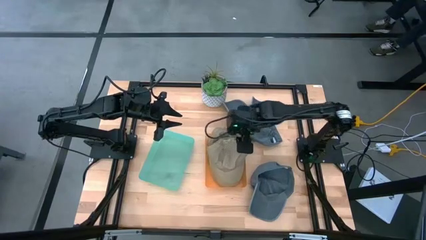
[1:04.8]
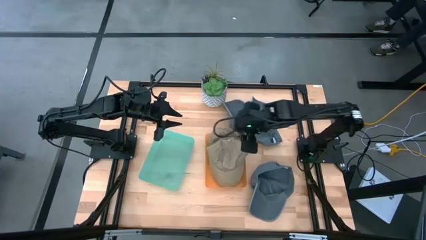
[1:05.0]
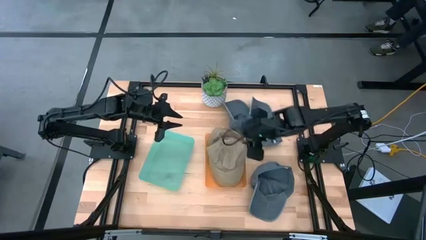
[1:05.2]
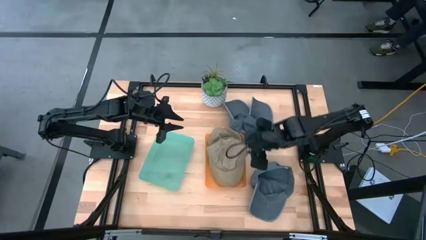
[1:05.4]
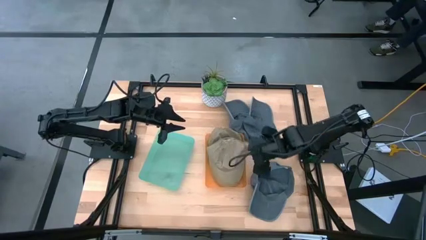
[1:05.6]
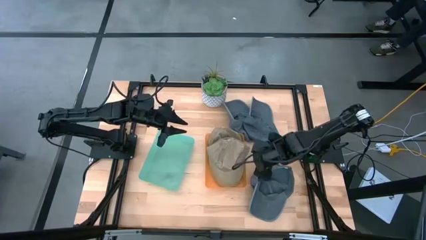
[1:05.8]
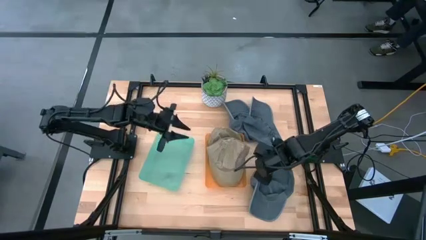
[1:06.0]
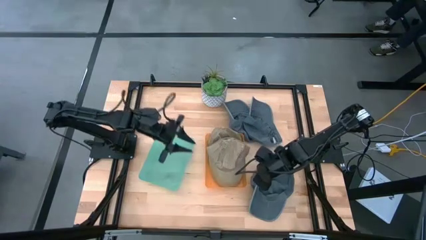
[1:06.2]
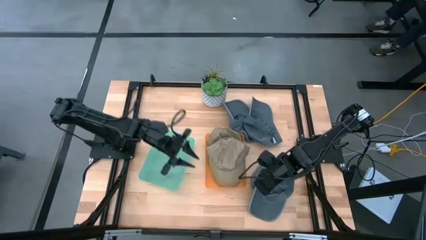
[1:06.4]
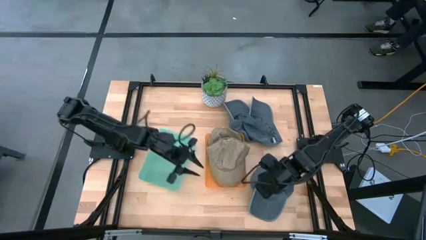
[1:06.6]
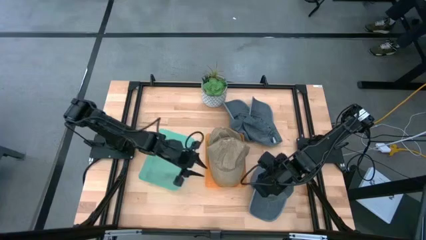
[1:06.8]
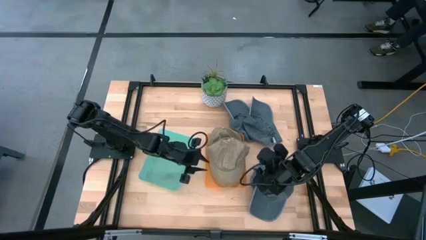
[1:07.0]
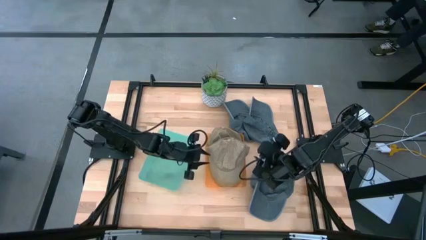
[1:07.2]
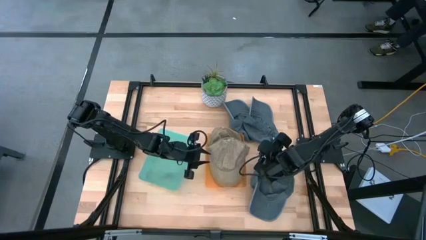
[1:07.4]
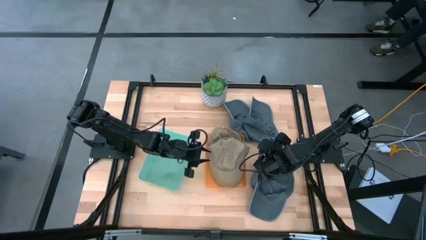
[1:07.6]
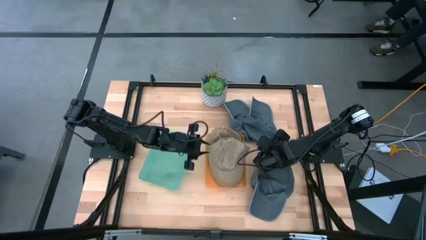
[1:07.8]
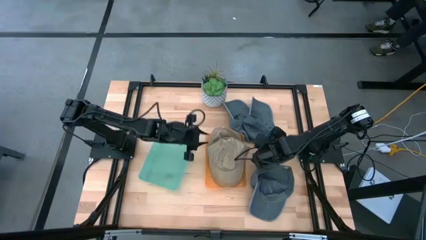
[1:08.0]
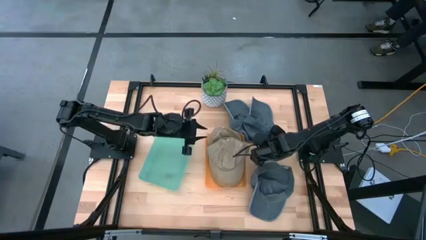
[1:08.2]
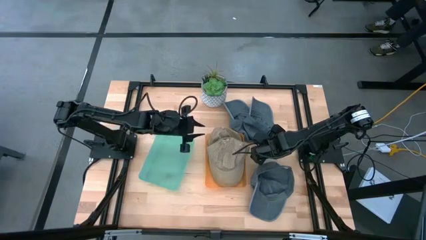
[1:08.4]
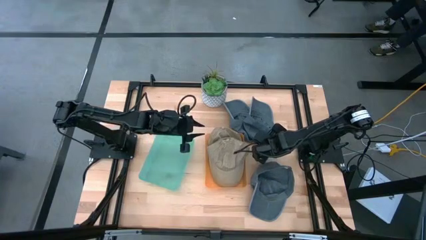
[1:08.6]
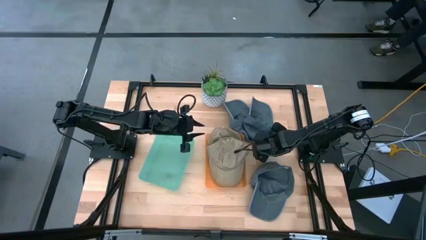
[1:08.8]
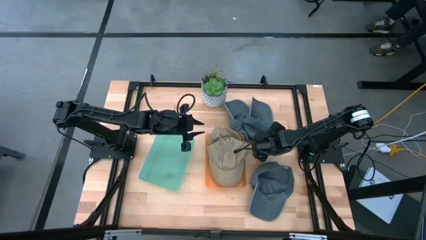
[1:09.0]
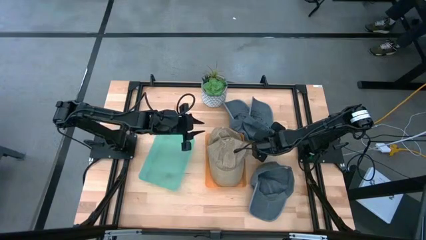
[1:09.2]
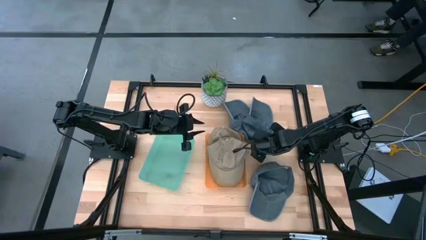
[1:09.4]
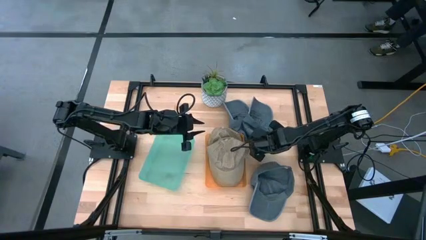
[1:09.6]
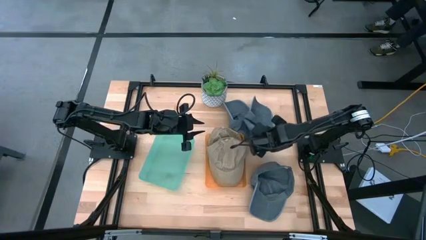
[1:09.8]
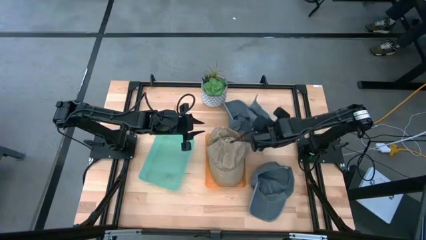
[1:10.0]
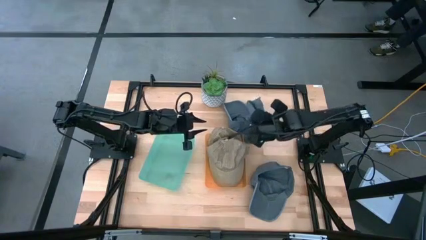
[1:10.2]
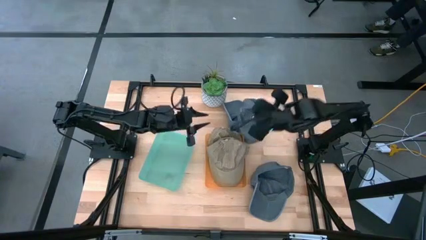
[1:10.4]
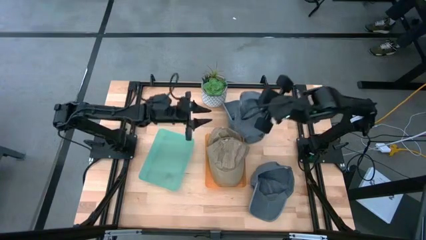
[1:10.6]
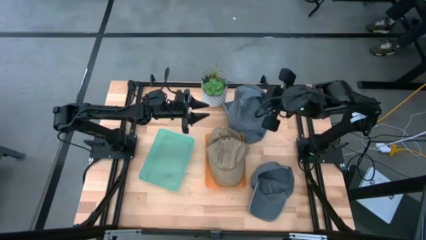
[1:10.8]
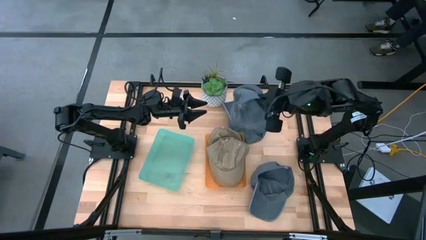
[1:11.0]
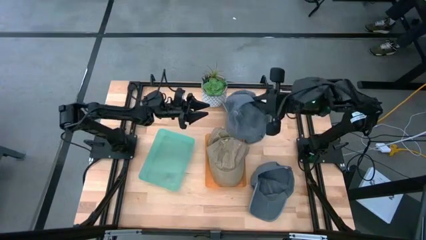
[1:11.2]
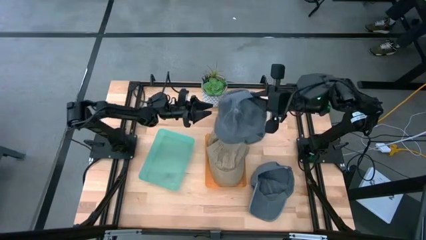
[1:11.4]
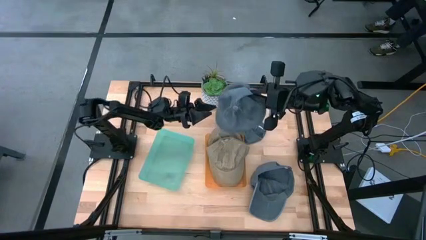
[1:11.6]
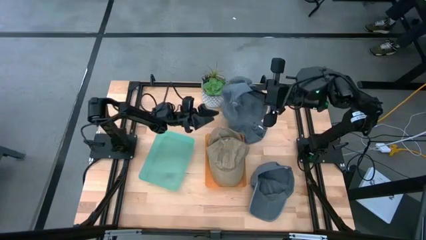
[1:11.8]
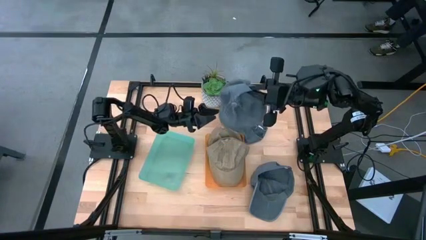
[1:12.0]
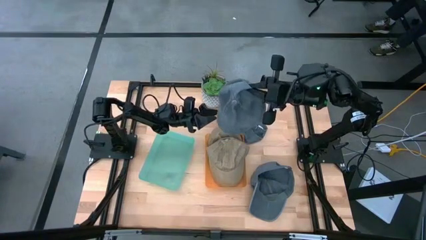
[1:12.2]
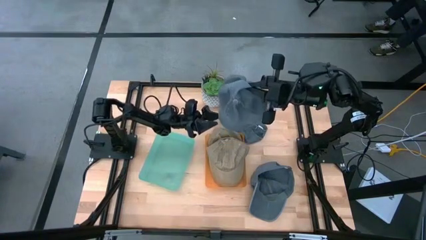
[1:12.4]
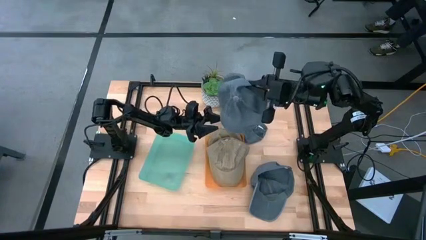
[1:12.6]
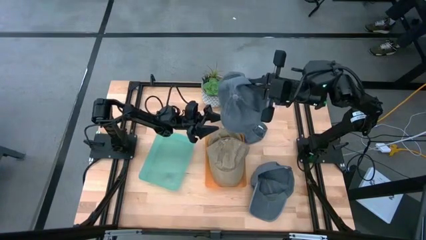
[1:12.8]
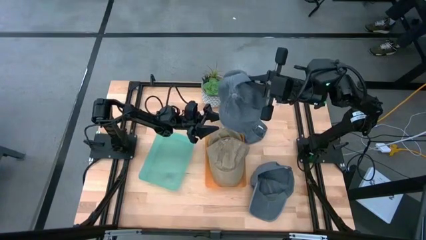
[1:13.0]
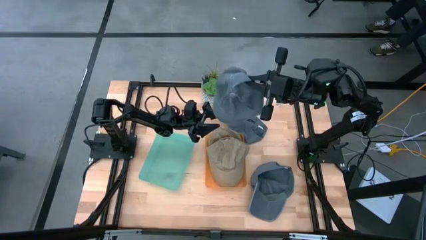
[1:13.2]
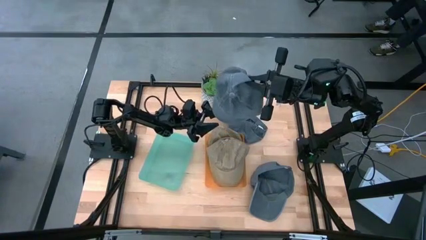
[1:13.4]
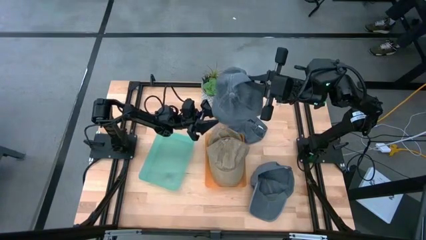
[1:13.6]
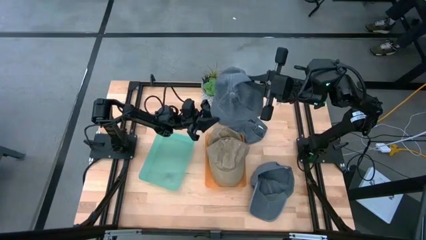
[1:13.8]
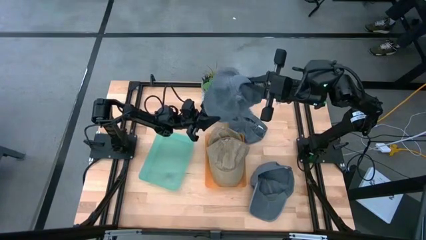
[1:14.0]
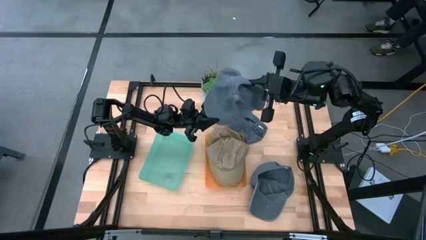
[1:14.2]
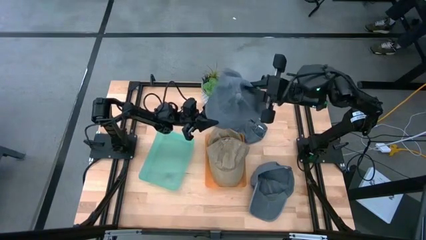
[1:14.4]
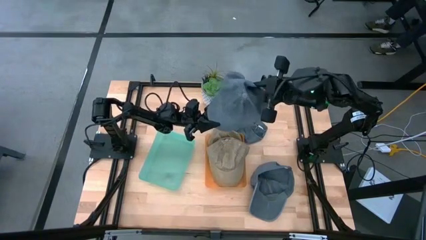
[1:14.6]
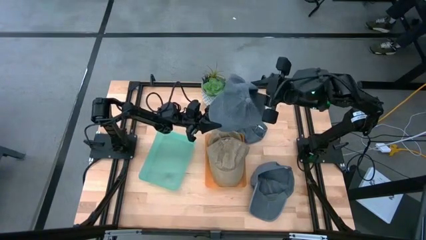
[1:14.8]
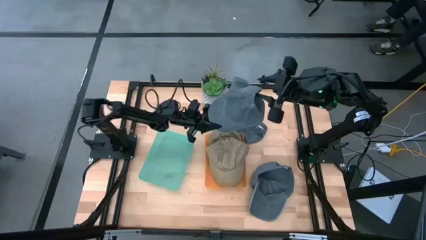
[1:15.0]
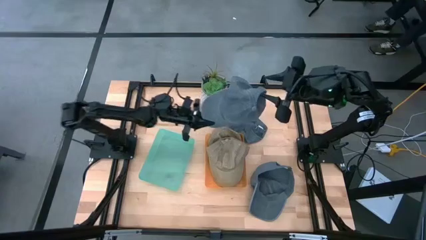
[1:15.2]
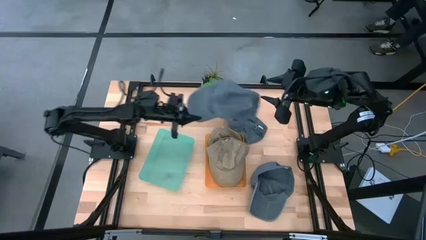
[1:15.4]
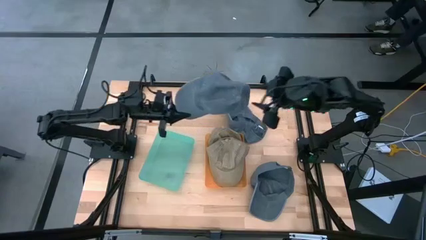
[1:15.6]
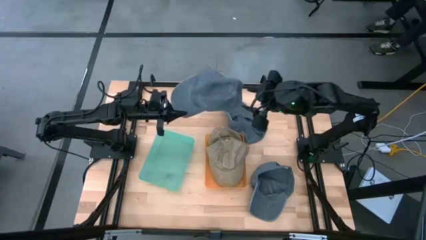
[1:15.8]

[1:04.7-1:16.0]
Task: Pick & Place hat
Put the top right blue cap into the green bin
